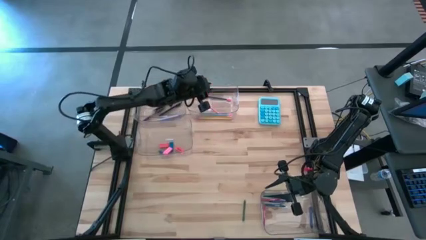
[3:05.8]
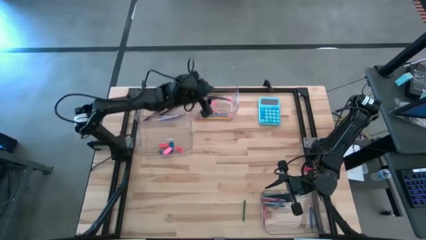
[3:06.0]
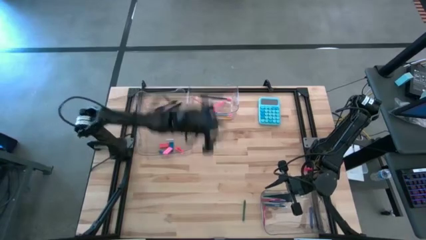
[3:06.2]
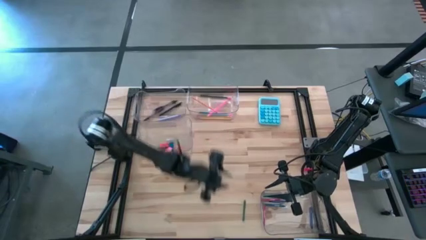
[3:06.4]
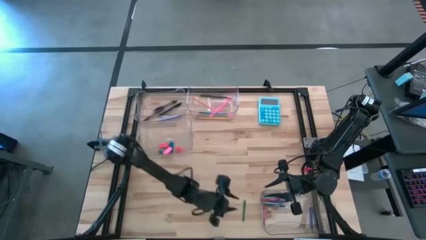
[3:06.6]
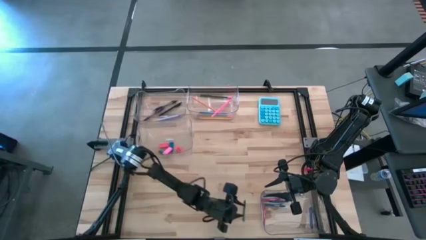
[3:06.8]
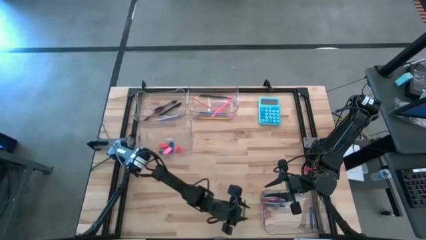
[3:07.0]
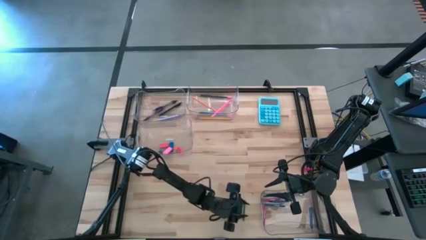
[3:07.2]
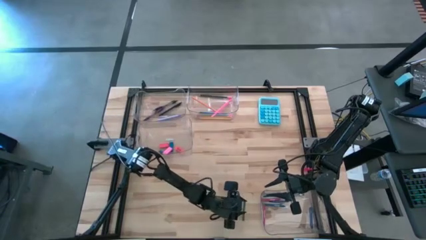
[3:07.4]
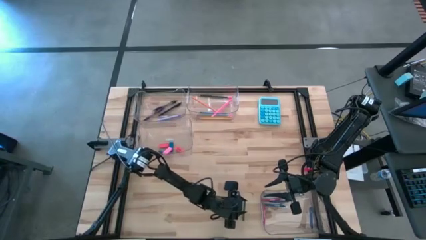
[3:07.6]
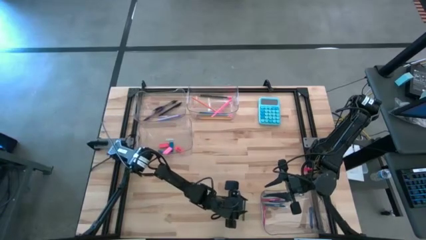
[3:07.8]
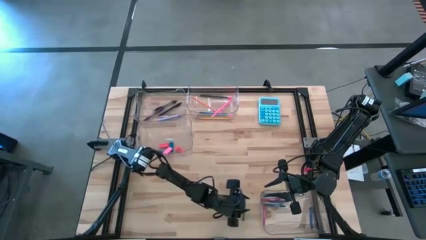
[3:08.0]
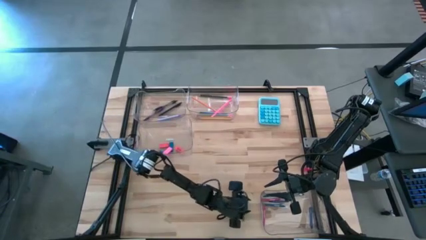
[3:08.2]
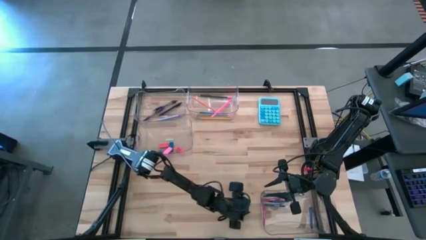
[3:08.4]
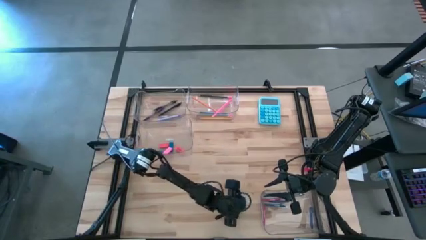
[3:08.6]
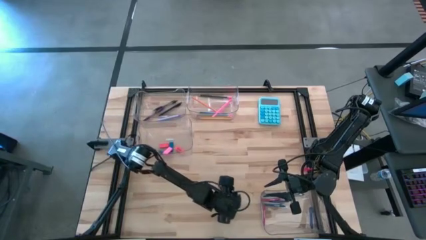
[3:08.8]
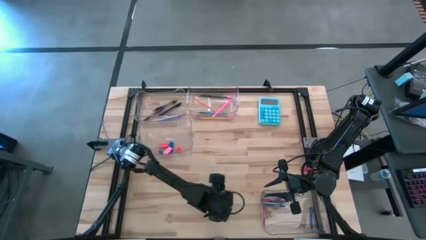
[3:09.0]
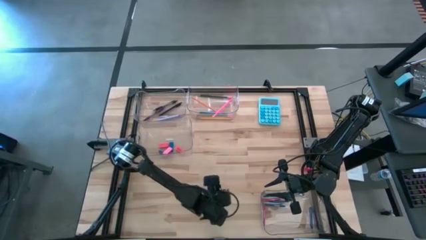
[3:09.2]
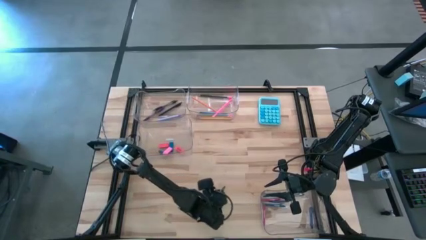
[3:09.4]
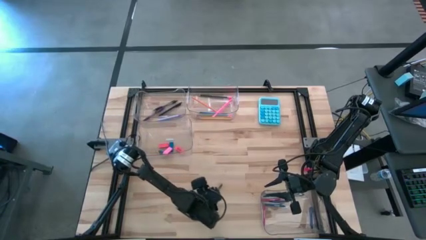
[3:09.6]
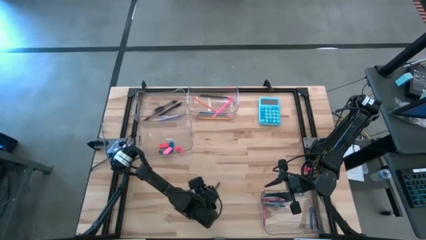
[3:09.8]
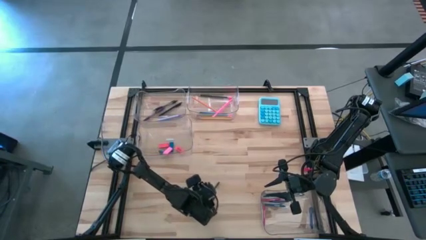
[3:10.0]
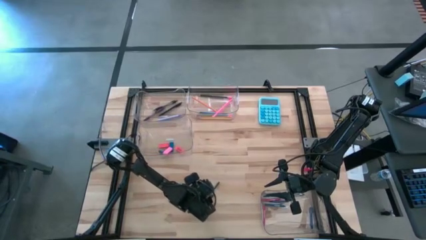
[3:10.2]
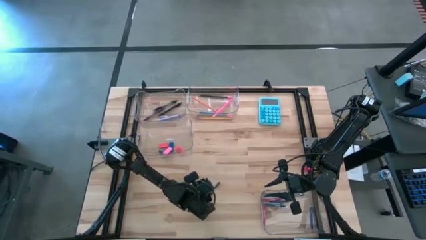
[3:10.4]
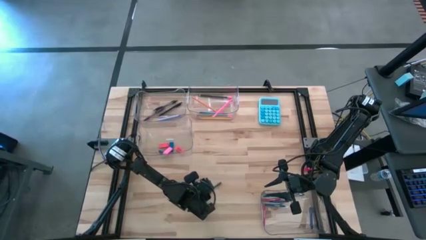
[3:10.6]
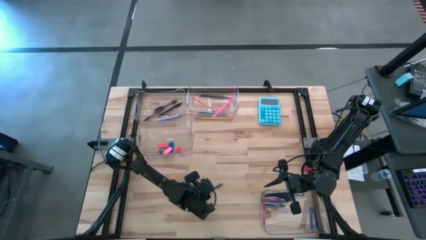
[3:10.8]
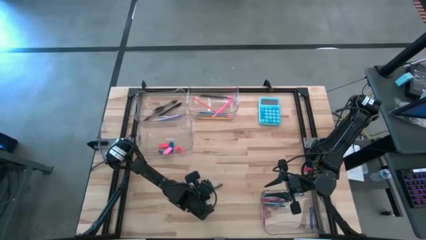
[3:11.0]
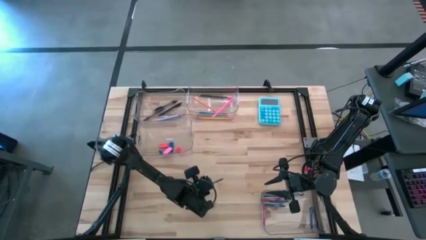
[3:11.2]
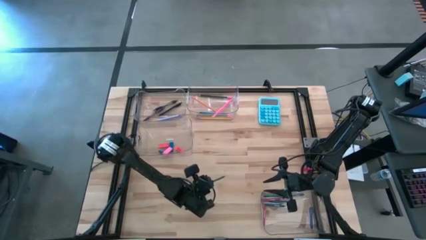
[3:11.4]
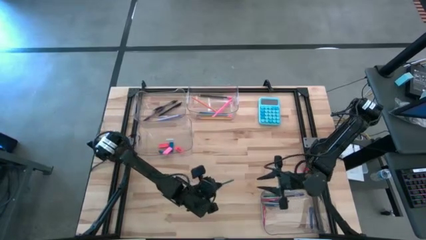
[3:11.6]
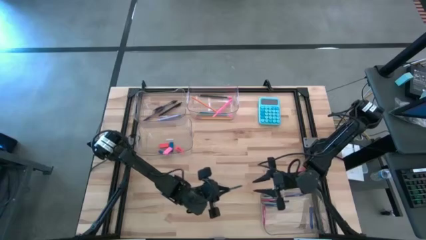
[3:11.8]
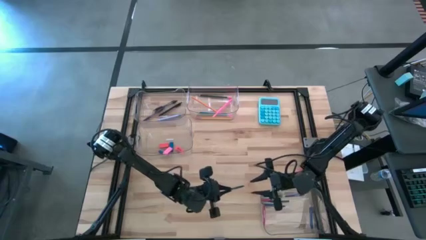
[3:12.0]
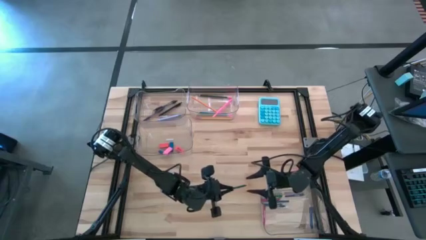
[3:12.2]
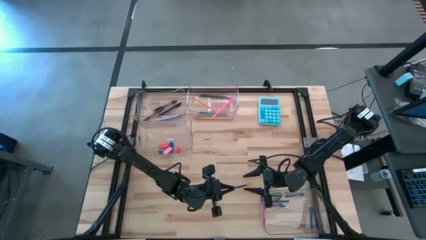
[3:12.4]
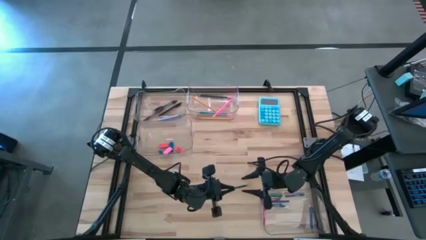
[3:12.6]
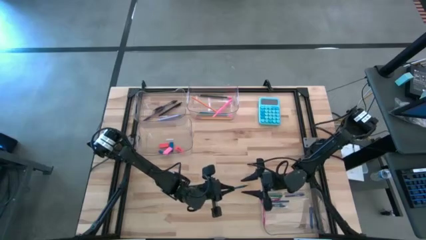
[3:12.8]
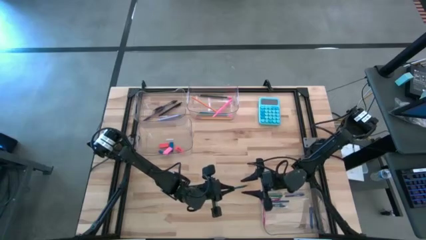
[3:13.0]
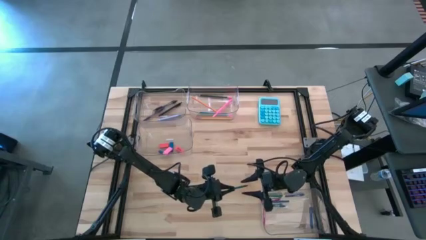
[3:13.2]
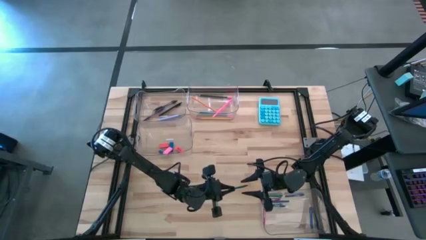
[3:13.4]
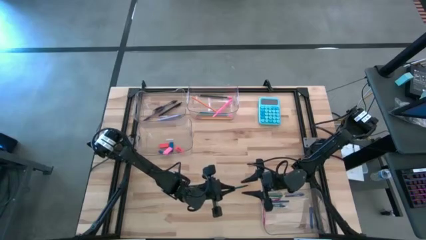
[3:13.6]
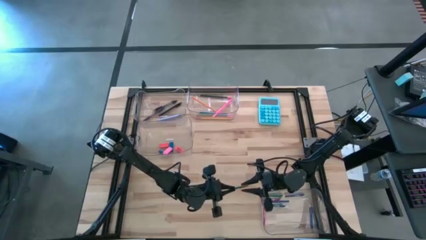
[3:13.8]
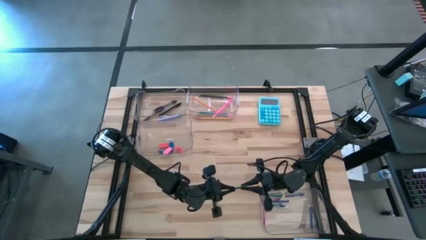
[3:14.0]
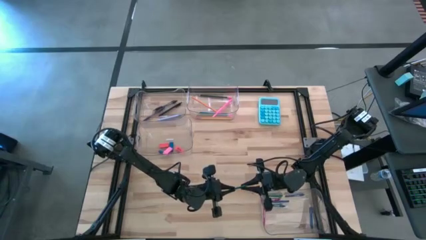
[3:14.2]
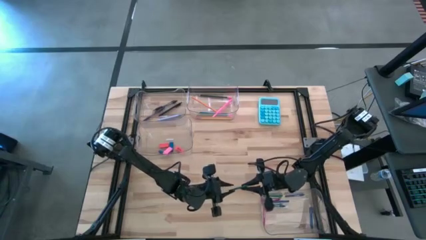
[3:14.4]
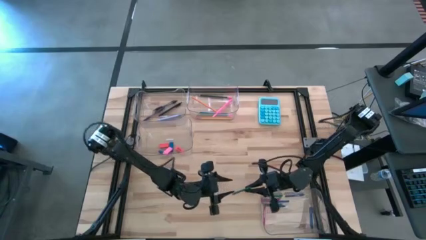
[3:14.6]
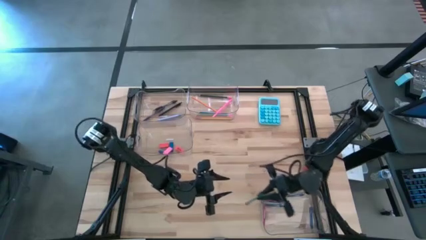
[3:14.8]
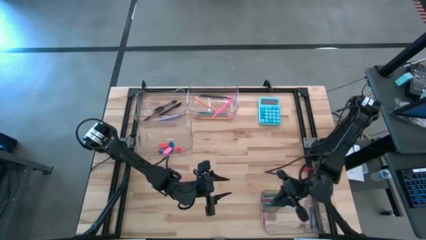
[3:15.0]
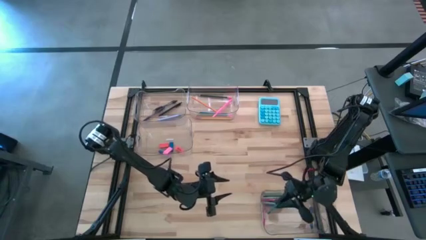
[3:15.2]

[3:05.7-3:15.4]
Task: Sort crayons/erasers/pens/pencils in bins
Put the dark green crayon into the bottom left transparent bin

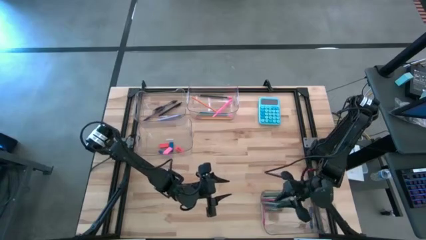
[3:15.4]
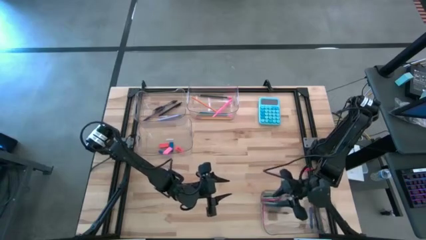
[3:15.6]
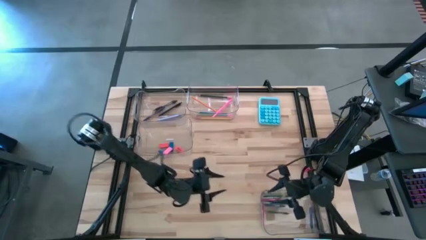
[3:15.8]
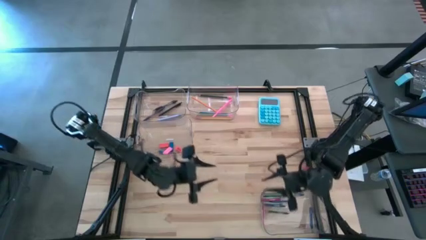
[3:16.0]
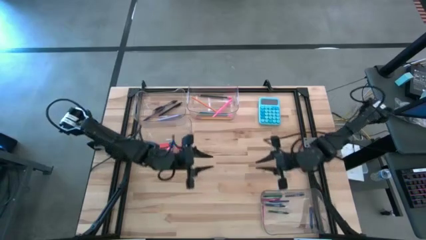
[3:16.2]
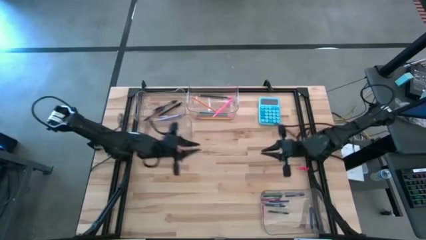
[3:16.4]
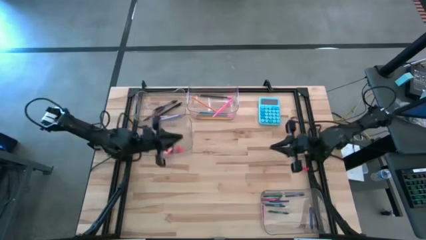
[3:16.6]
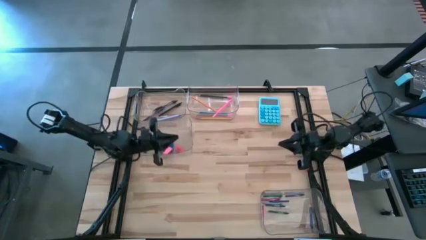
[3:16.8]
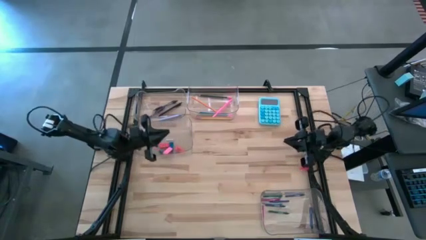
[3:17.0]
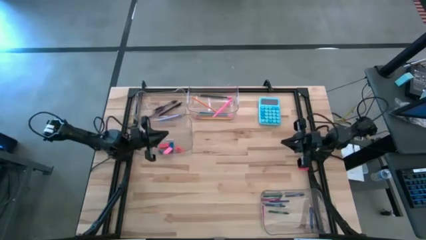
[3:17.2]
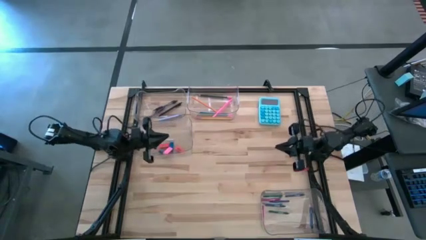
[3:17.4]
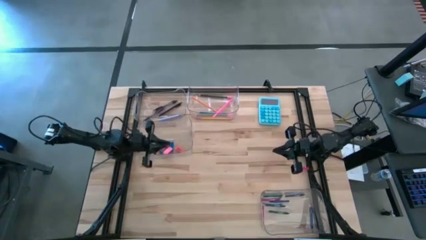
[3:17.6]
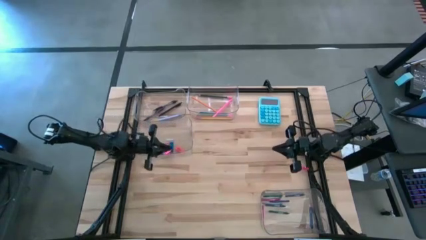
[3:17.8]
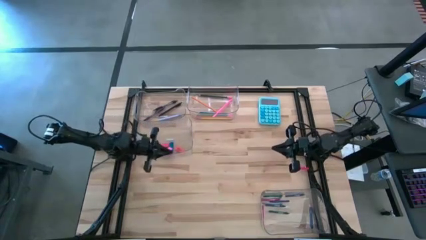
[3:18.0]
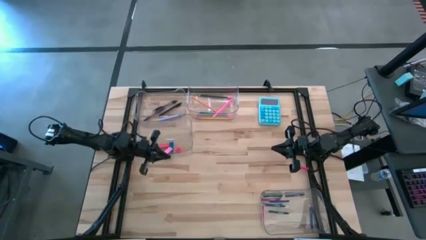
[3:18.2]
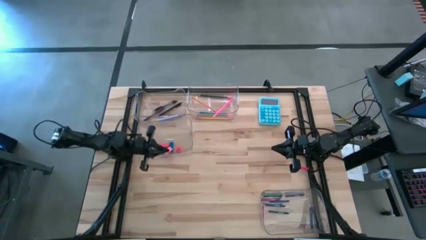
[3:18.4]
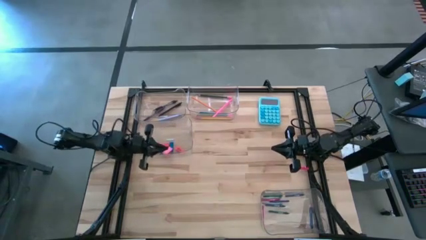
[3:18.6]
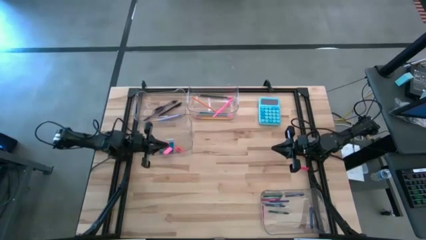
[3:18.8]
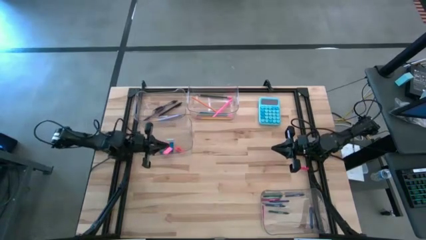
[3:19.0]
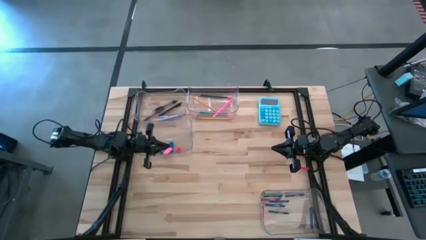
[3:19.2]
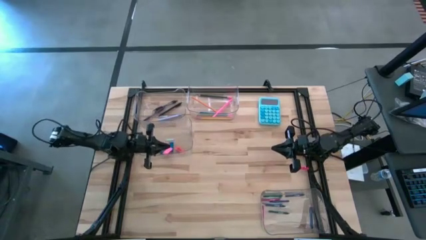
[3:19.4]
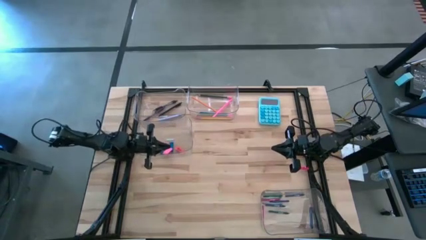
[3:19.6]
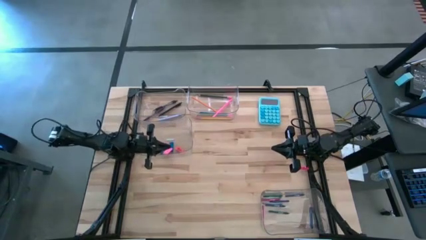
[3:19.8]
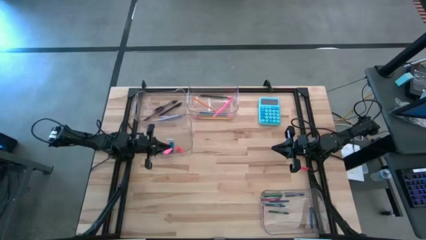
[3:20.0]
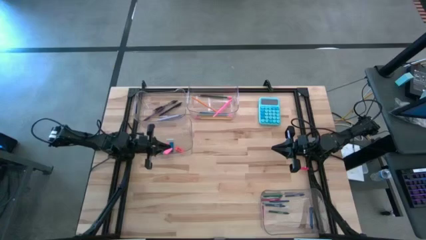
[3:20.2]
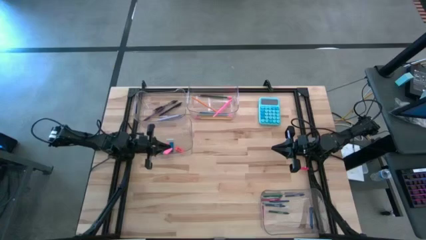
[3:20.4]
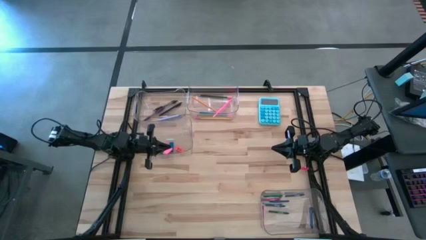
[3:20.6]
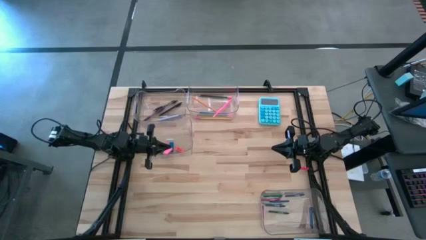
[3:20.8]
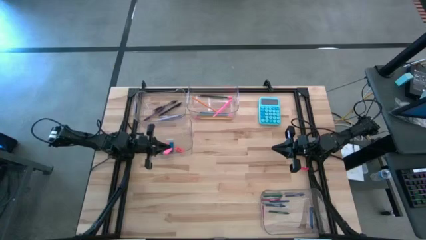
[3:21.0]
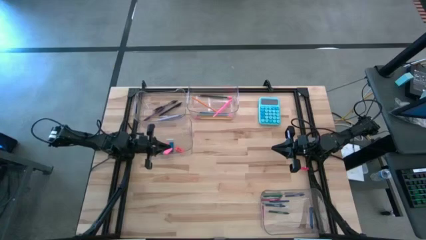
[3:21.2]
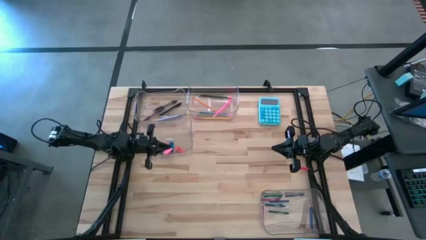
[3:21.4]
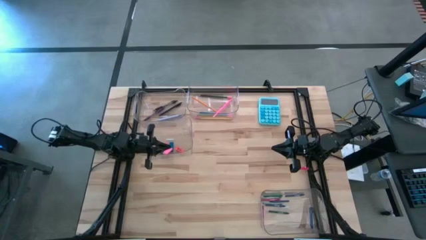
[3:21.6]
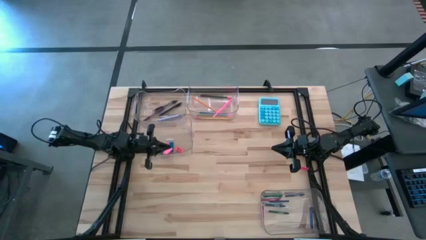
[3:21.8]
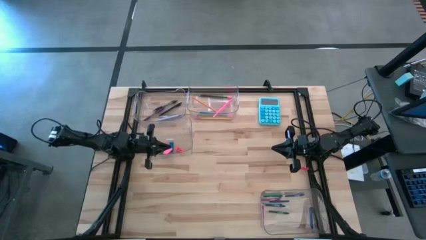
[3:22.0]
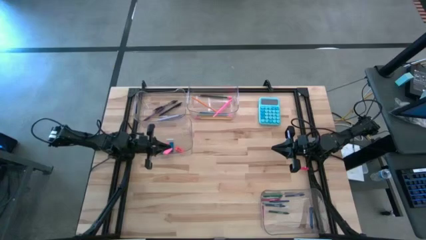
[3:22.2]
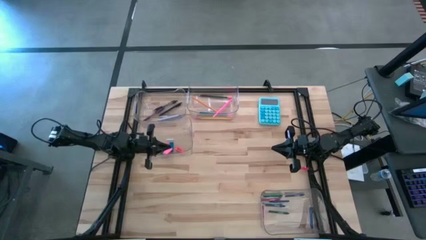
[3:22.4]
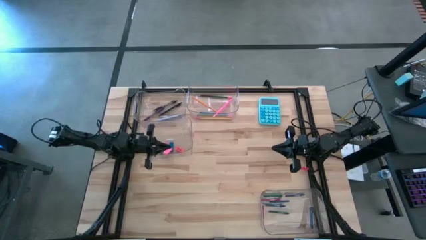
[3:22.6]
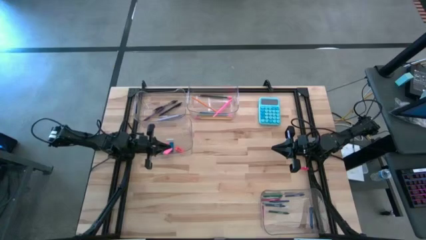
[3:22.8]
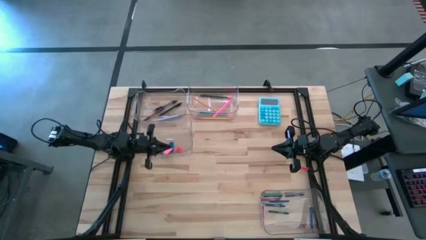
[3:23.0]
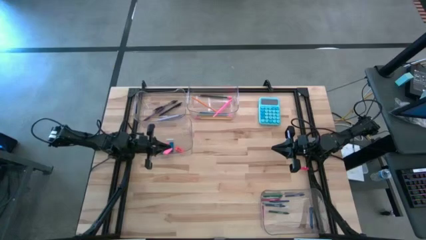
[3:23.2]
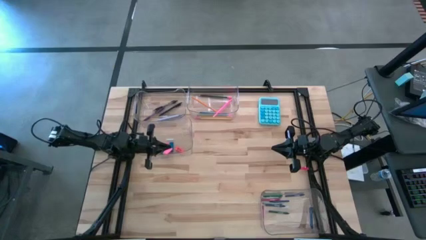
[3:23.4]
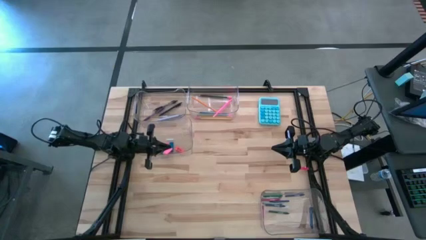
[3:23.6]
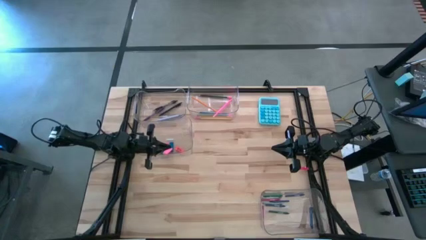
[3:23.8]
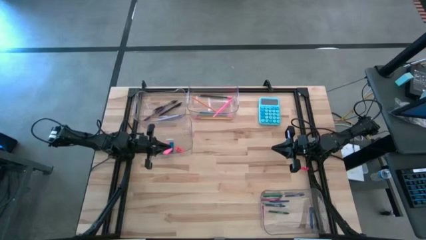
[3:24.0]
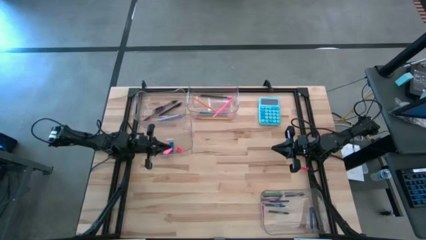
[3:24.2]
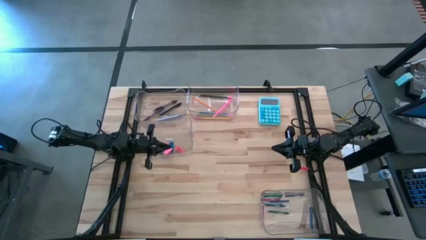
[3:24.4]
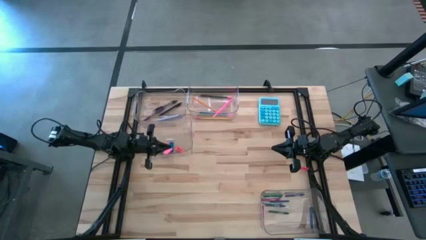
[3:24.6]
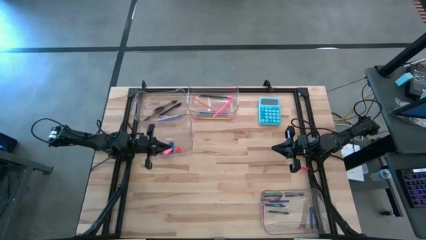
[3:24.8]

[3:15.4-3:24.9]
Return to Home Position
